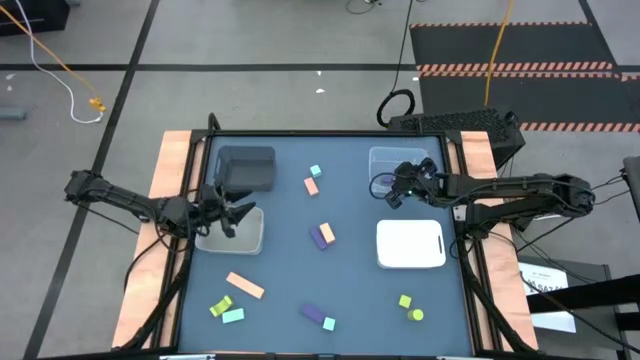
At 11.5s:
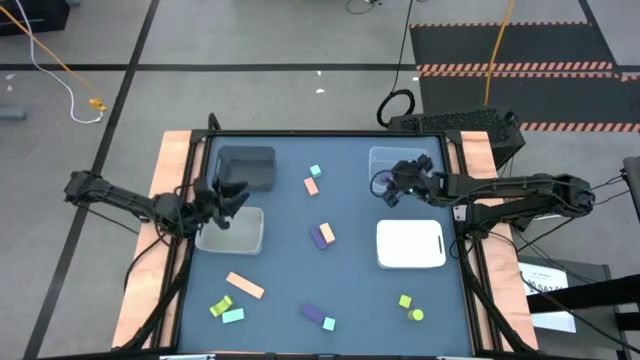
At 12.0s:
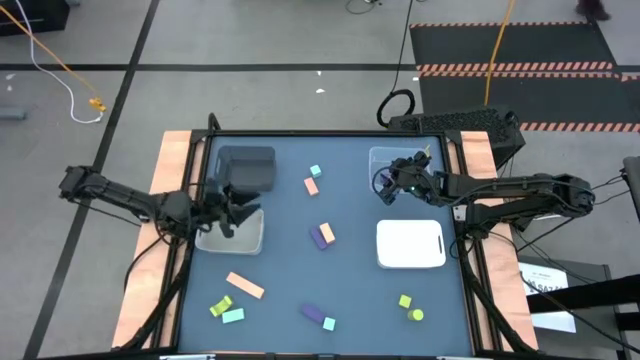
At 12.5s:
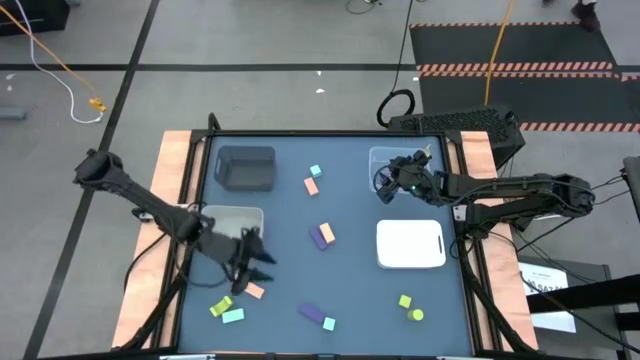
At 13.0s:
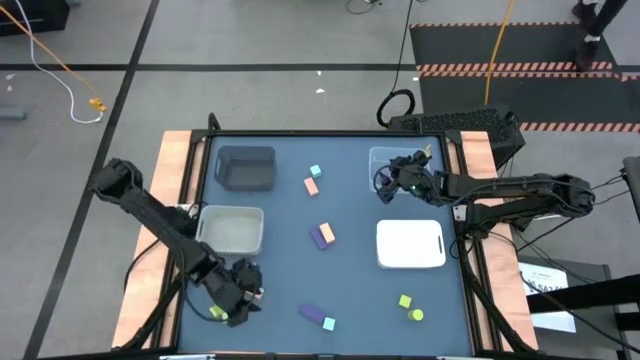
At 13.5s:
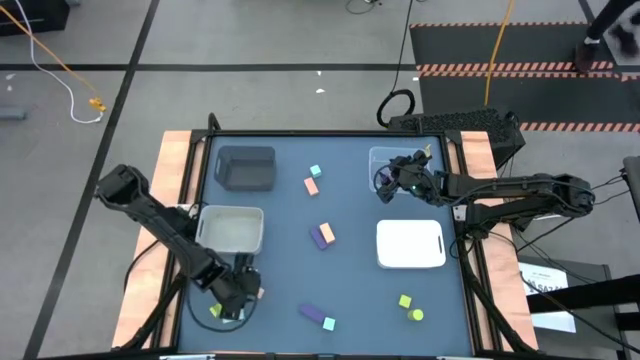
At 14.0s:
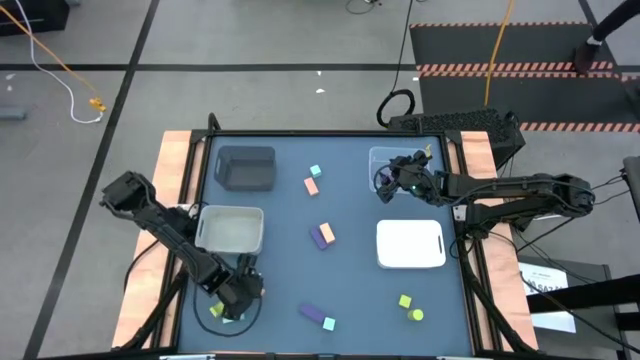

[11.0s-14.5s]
Task: Sort & place blocks by color
Put the bottom left brown block into the black bin

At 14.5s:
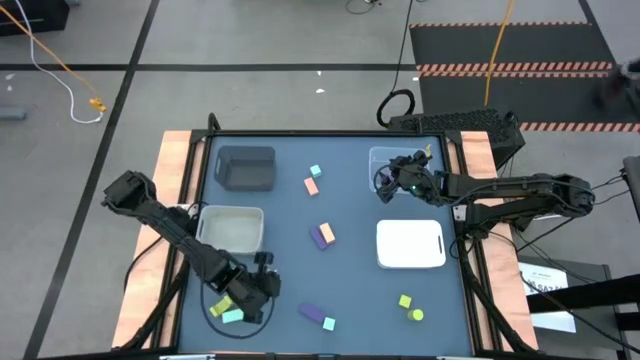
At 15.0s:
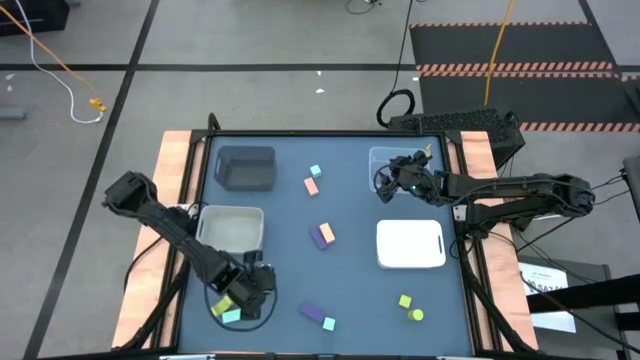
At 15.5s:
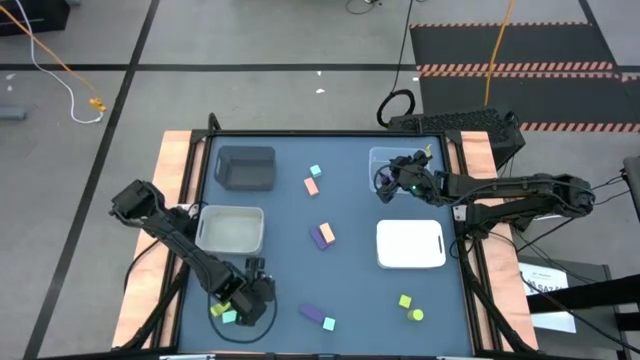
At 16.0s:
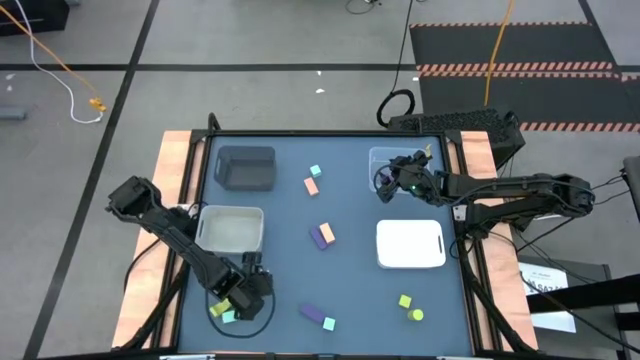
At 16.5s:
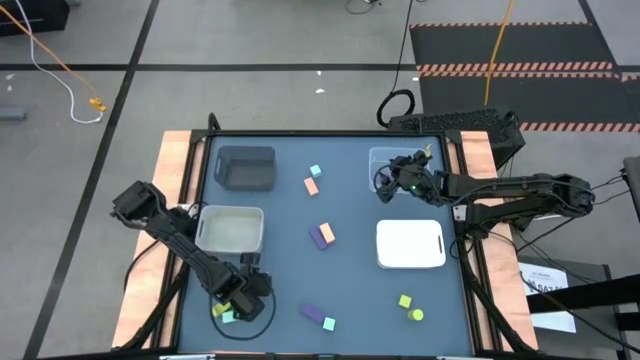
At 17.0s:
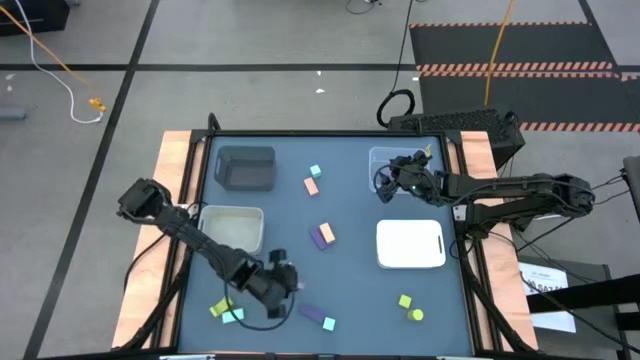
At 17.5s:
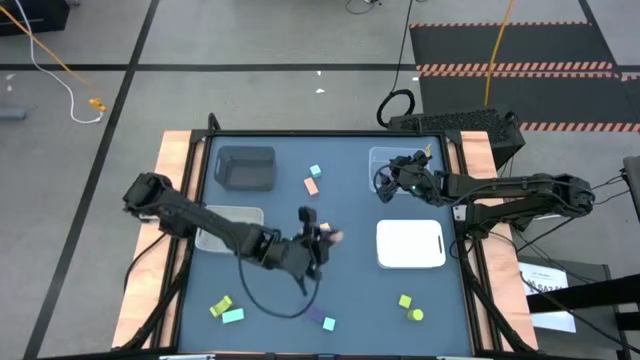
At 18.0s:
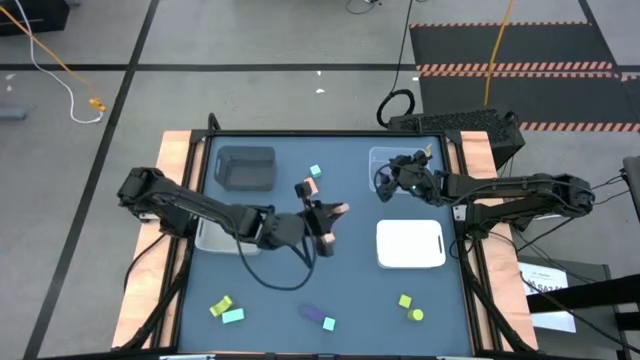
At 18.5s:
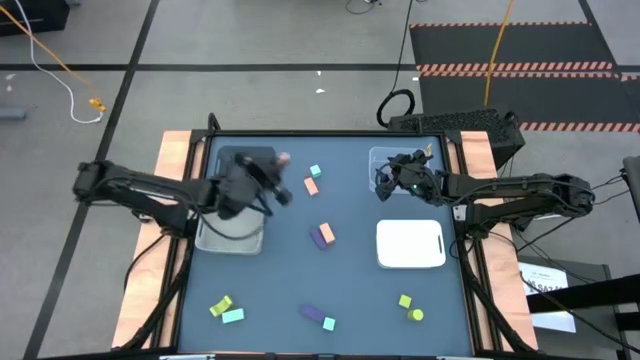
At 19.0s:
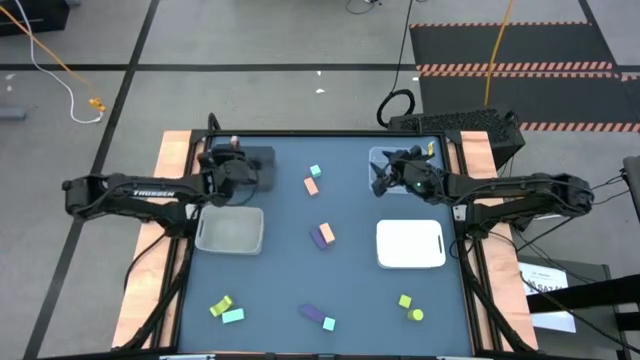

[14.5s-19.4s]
Put the bottom left brown block into the black bin

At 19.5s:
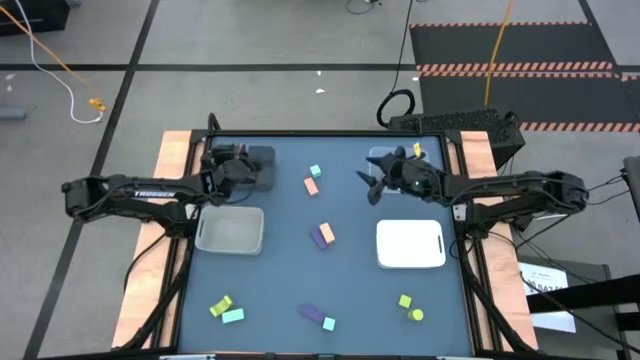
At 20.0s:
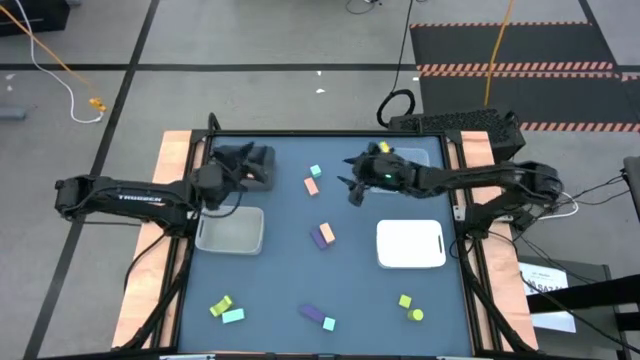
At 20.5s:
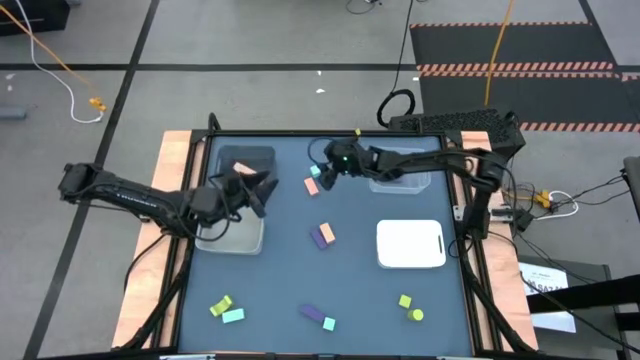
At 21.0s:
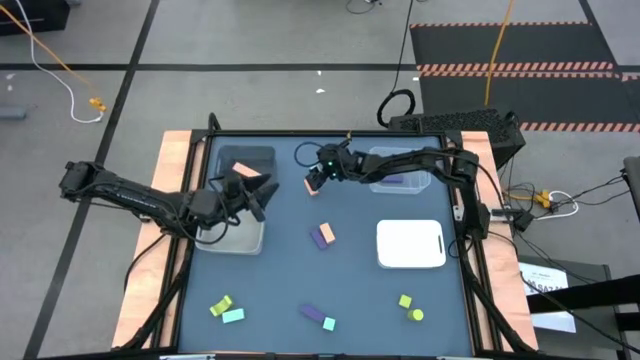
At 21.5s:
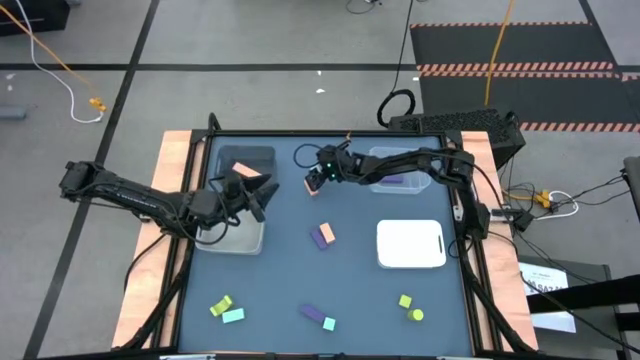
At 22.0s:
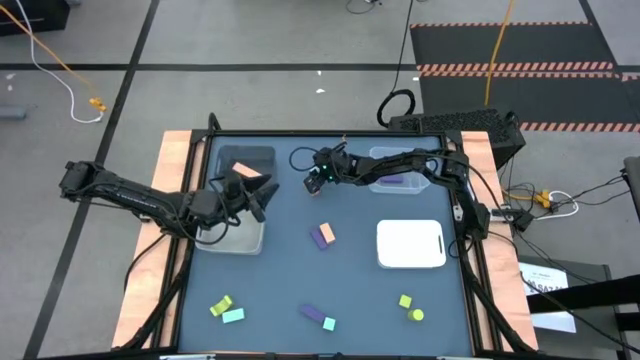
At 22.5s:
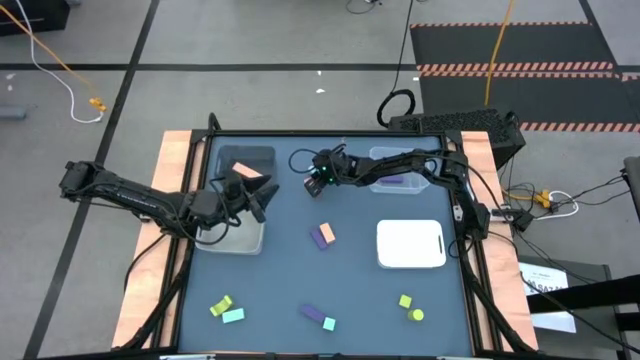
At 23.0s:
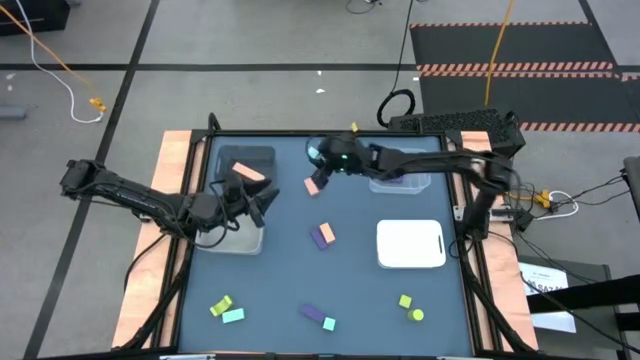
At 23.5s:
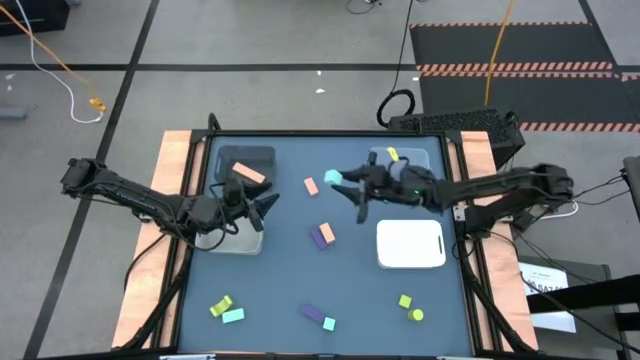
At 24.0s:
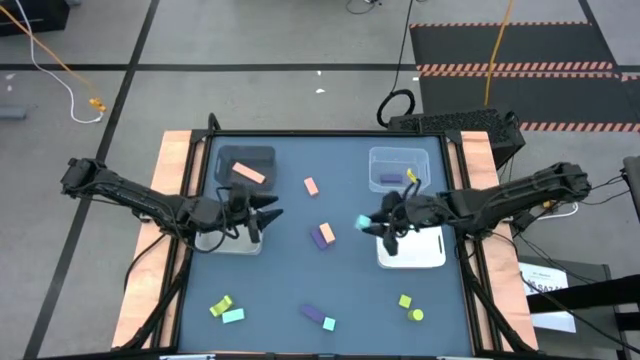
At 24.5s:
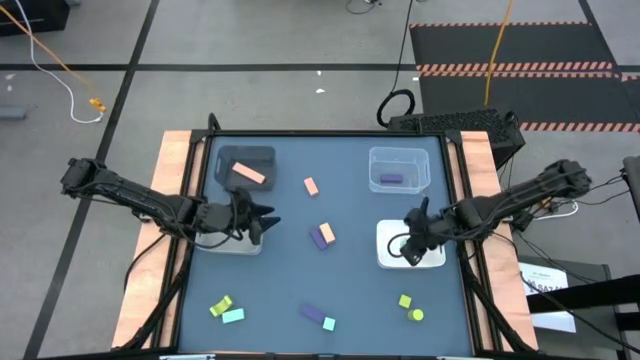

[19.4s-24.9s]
Put the top blue block into the white bin

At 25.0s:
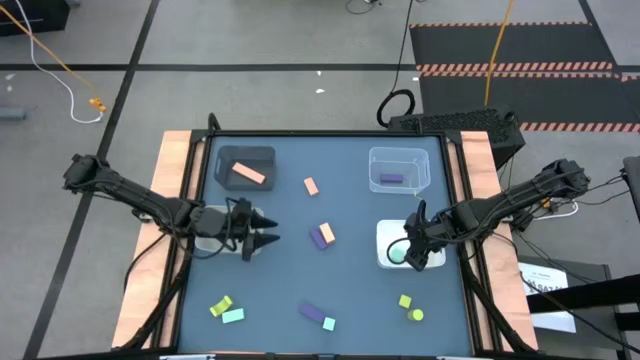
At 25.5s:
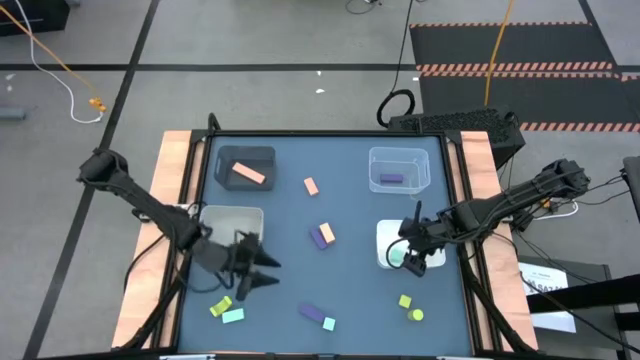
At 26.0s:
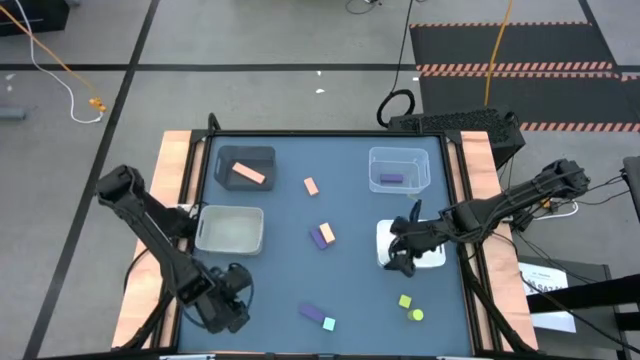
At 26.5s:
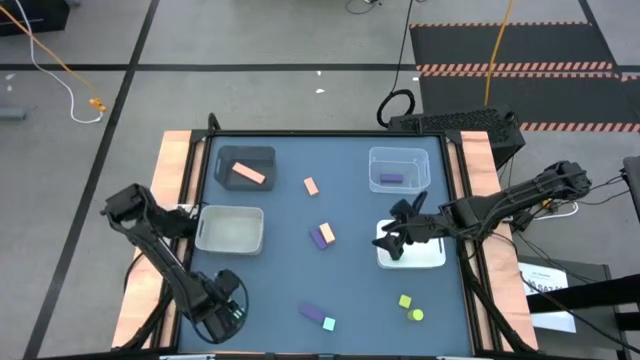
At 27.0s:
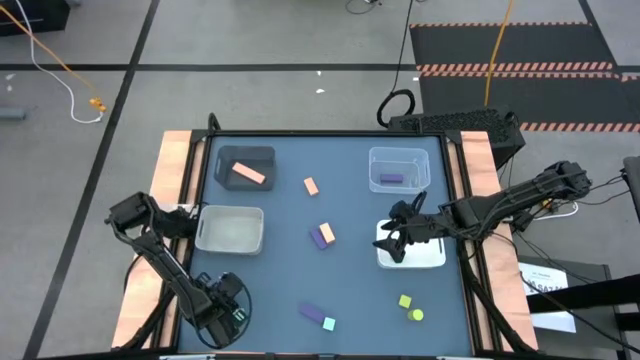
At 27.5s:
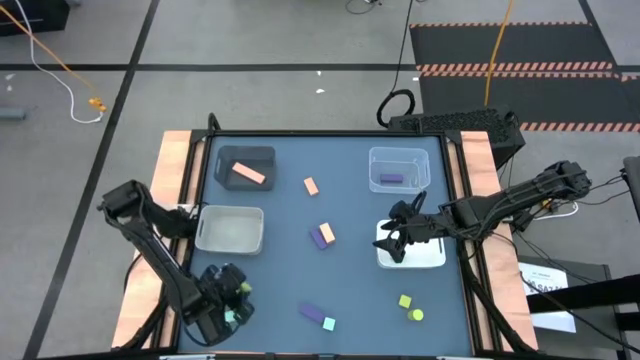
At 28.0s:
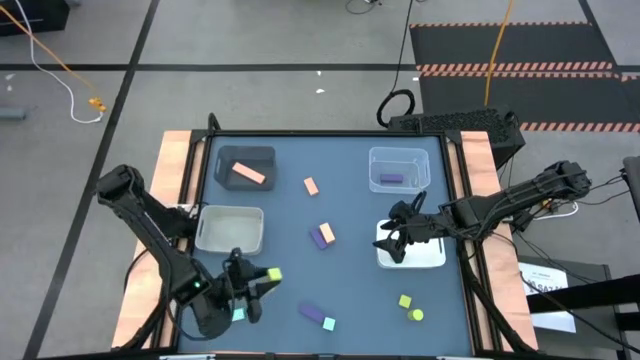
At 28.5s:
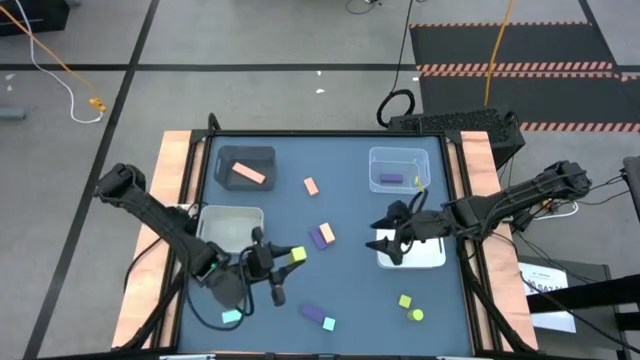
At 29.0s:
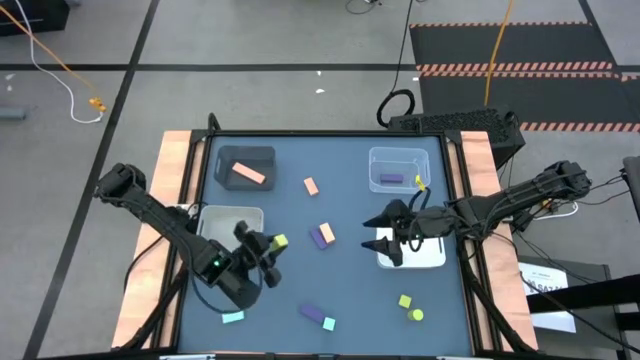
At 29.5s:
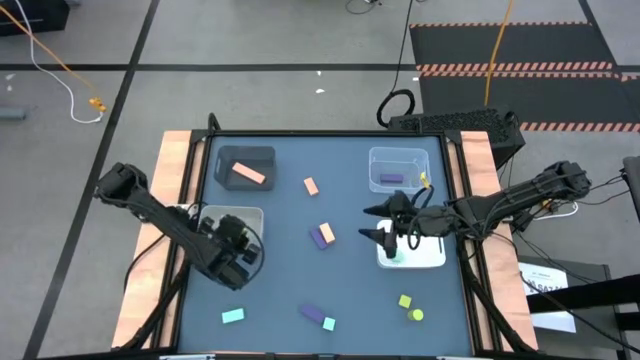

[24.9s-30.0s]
Put the bottom left green block into the gray bin

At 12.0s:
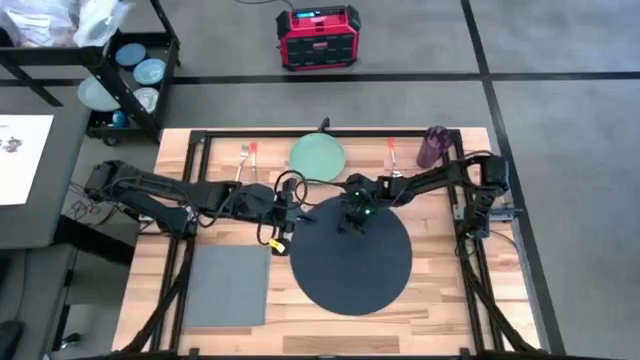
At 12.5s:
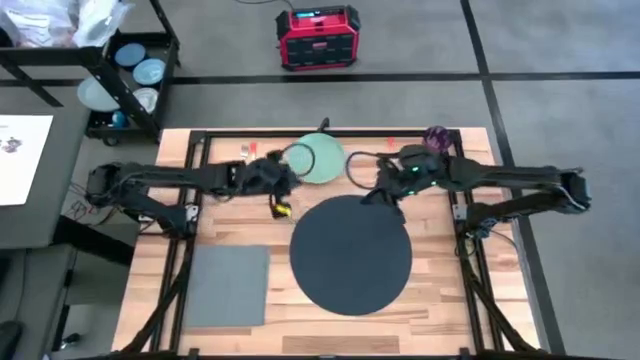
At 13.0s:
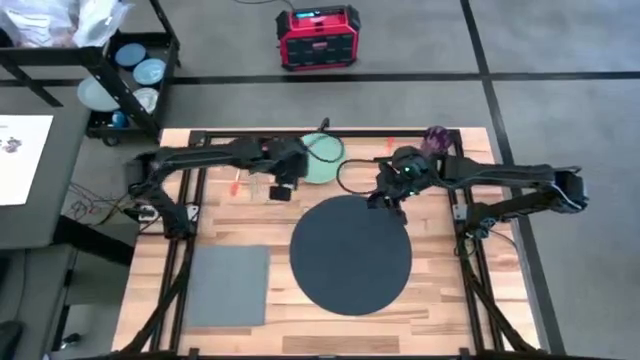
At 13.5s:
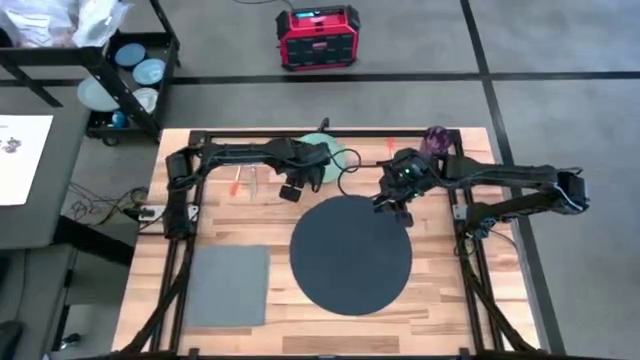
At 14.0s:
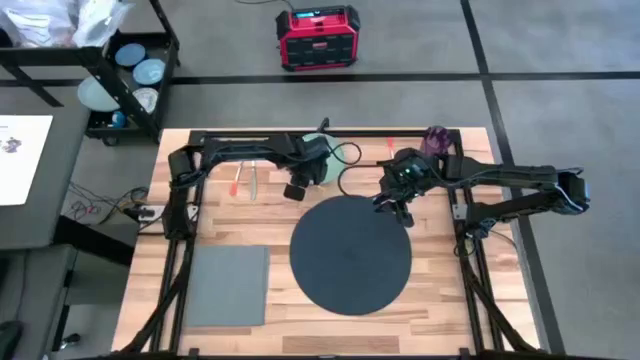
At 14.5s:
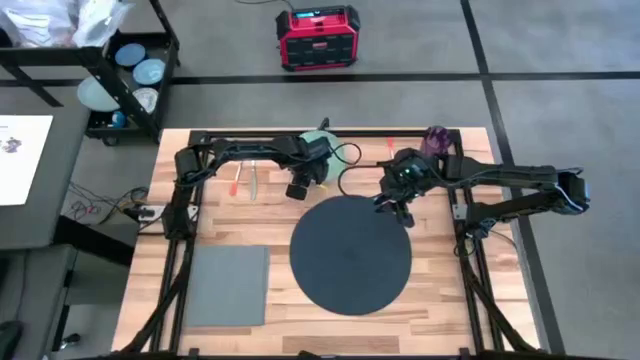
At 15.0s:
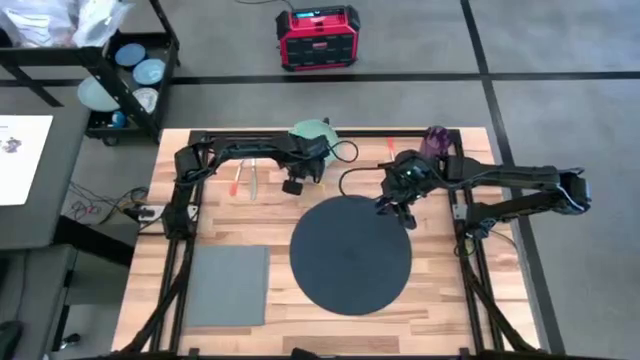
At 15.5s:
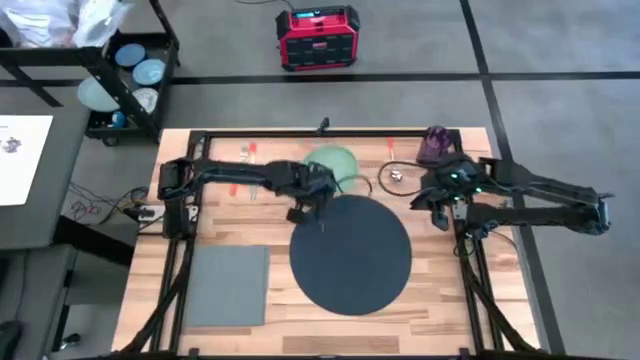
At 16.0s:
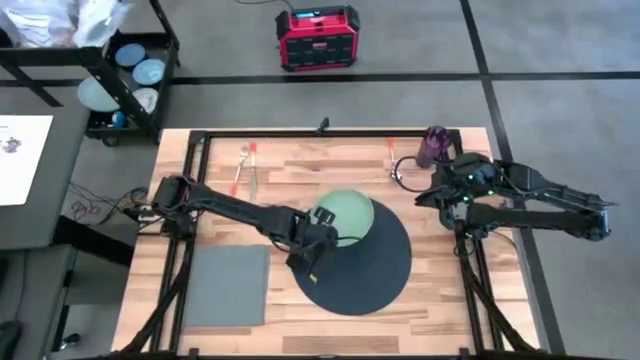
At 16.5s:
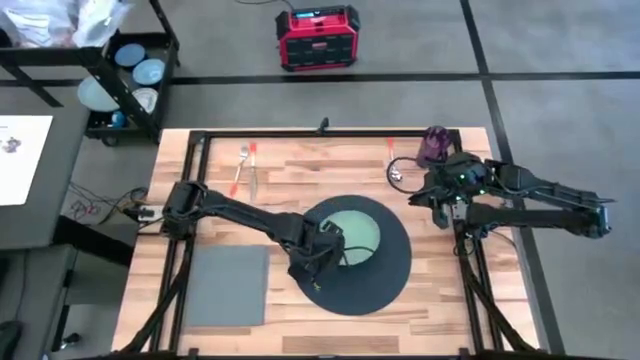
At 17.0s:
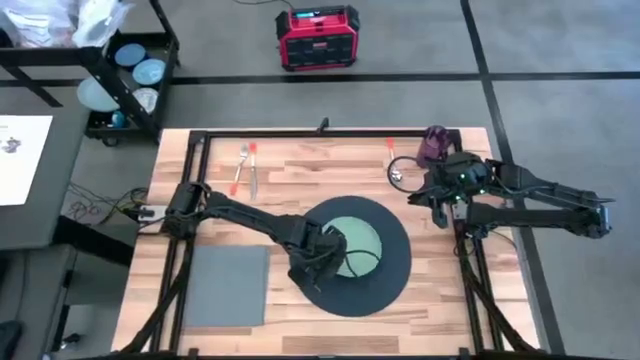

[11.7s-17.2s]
Task: Set table place
Put the green plate on the blue placemat
